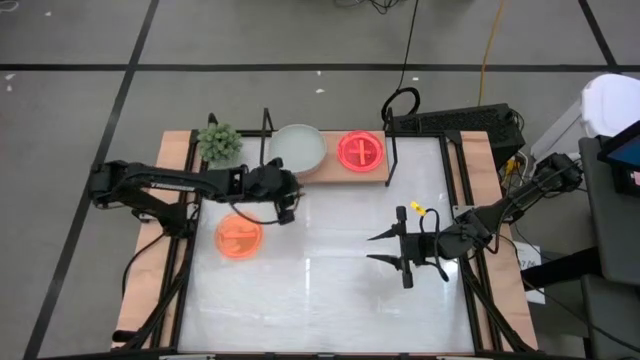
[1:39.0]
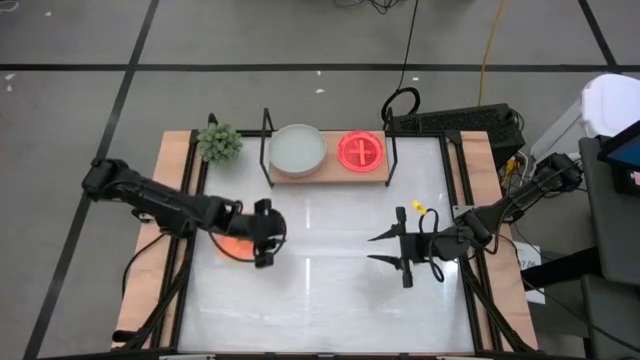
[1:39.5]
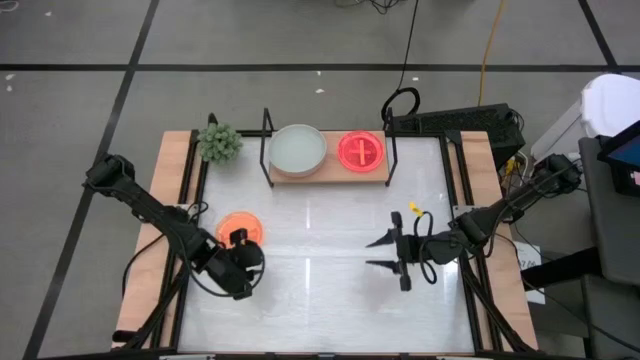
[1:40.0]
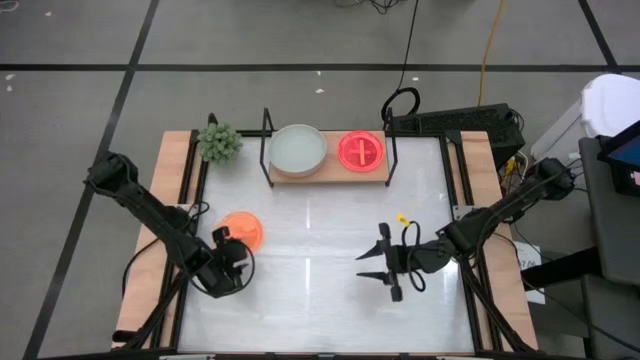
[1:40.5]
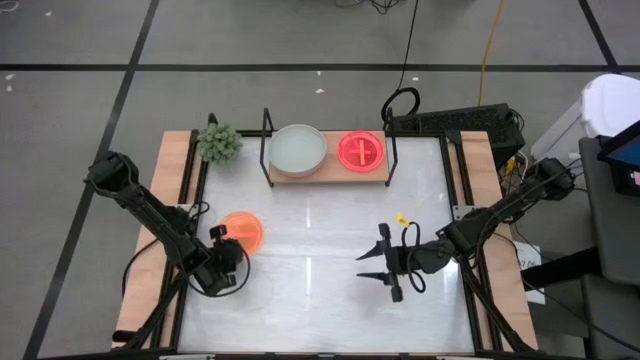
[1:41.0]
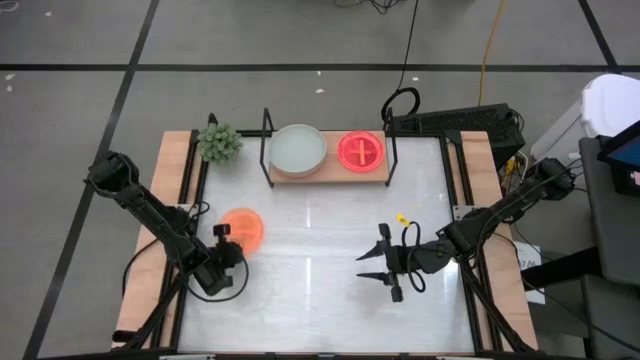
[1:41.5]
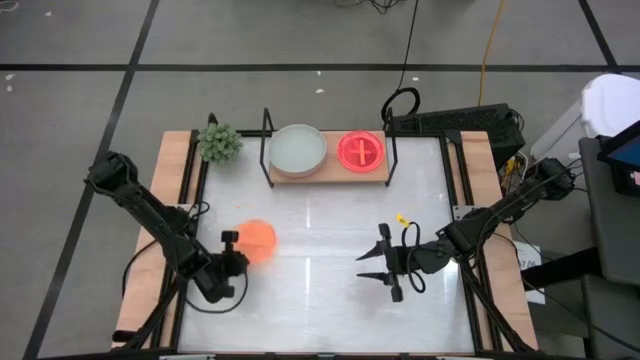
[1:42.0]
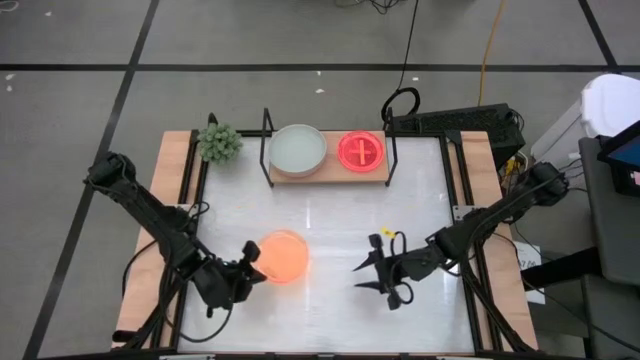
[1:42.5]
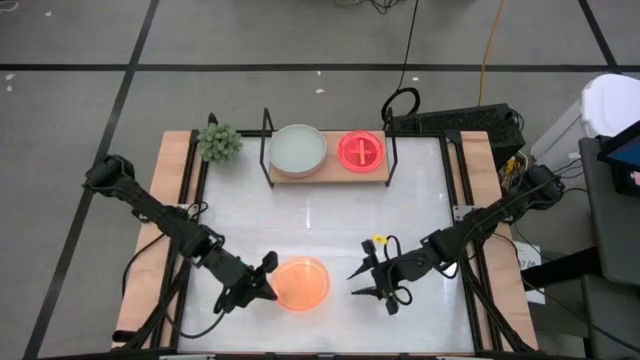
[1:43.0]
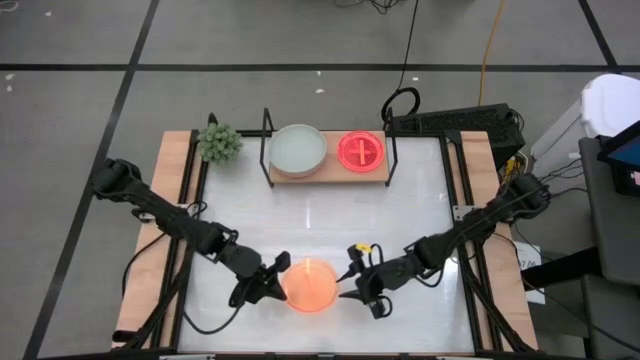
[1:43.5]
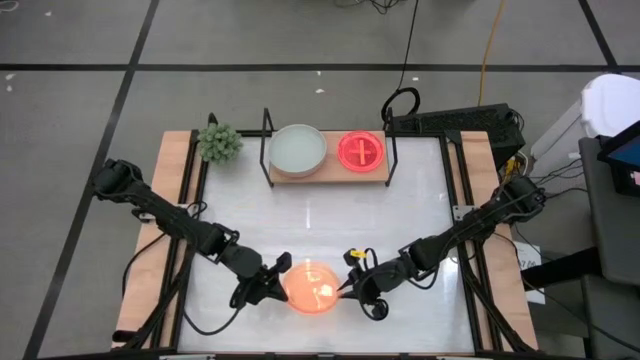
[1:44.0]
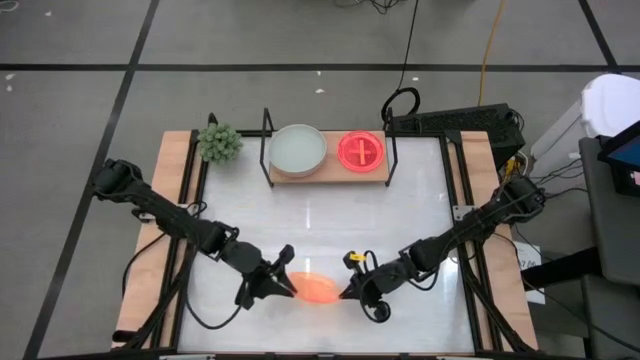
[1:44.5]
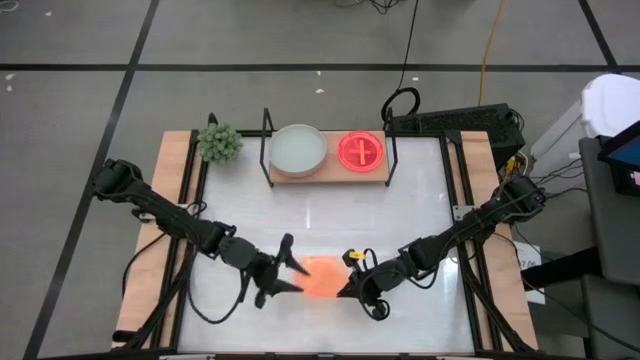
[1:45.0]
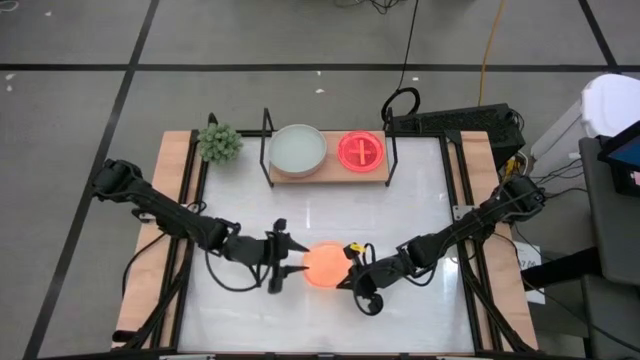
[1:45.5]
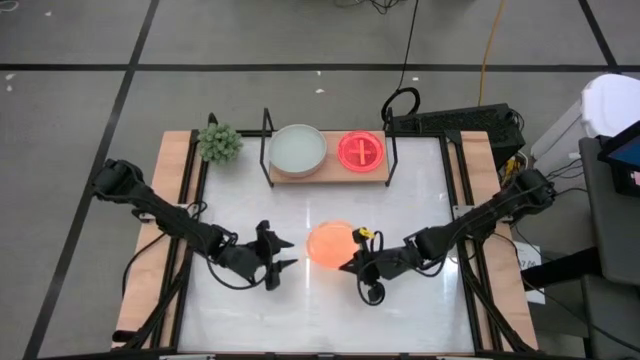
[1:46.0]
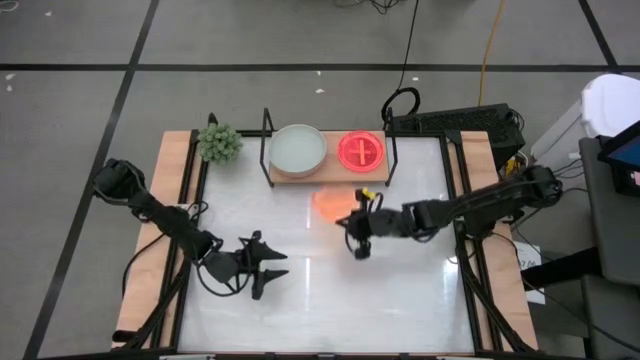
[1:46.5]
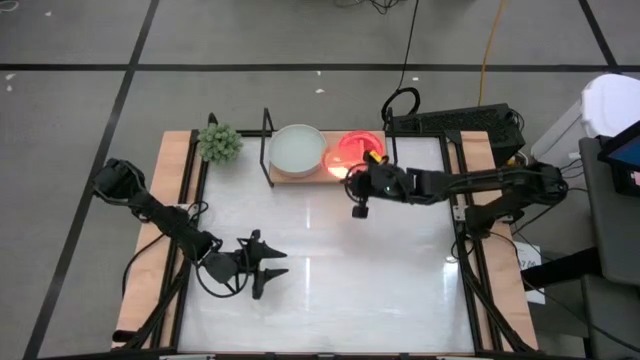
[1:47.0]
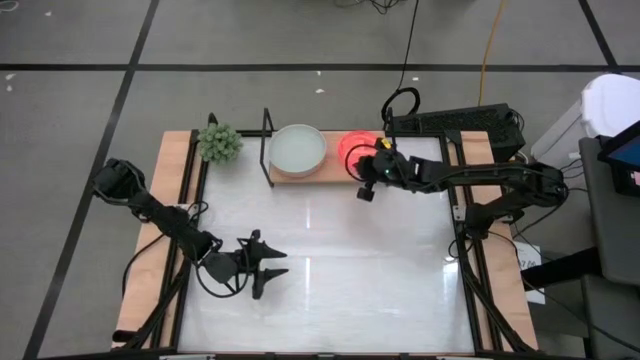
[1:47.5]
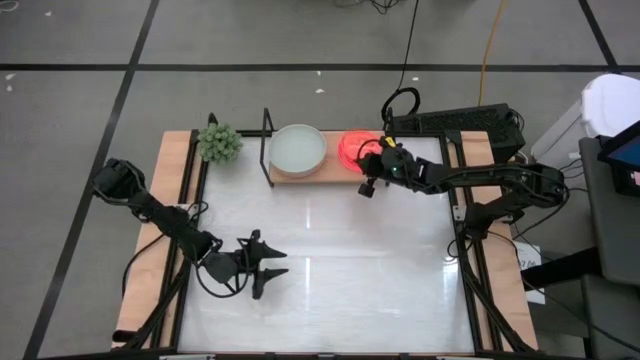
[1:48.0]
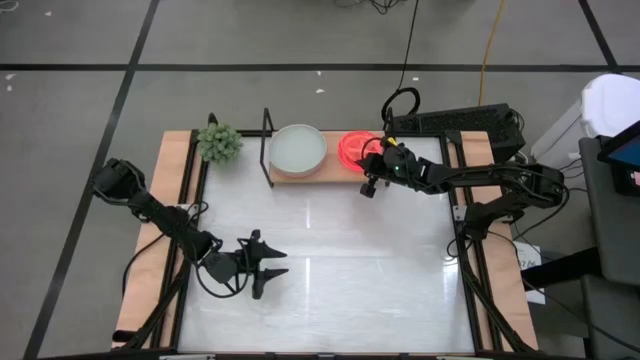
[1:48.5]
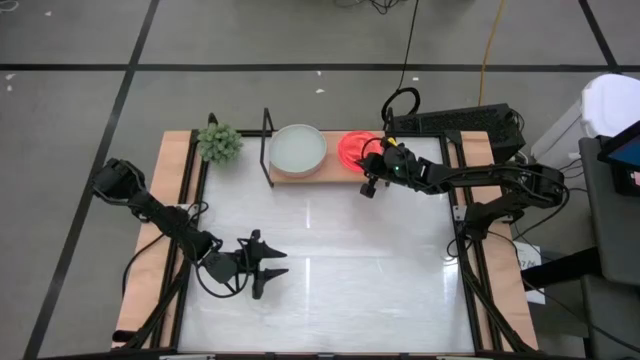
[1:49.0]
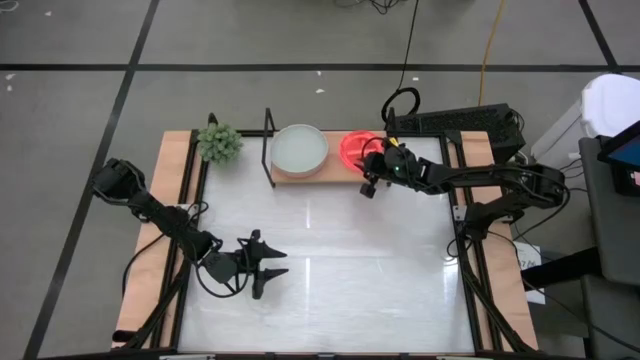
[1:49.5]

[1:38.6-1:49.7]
Task: Place and stack plates onto a shelf
Stack the orange plate on the orange plate on the shelf

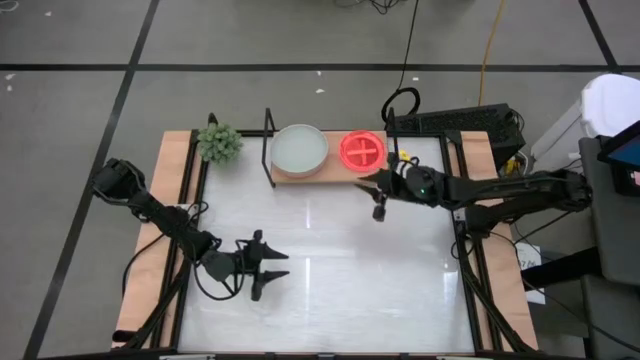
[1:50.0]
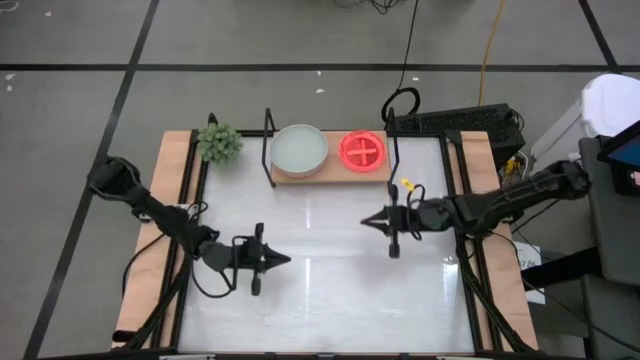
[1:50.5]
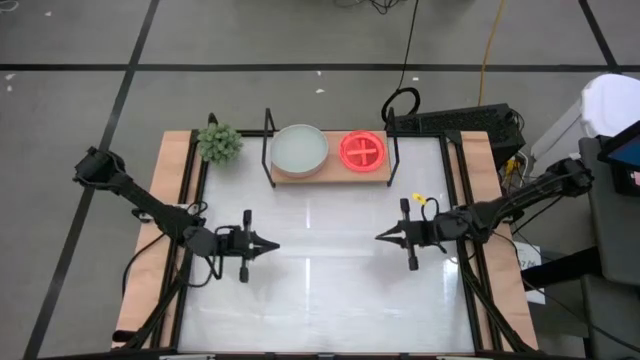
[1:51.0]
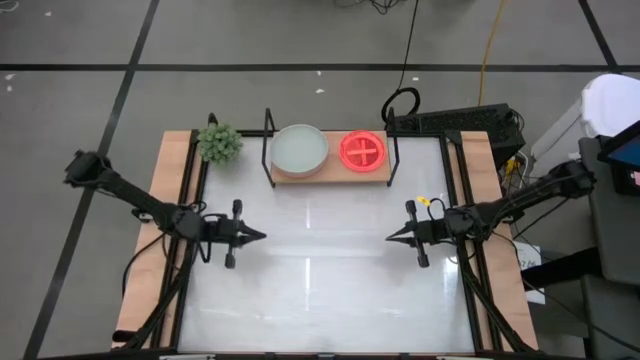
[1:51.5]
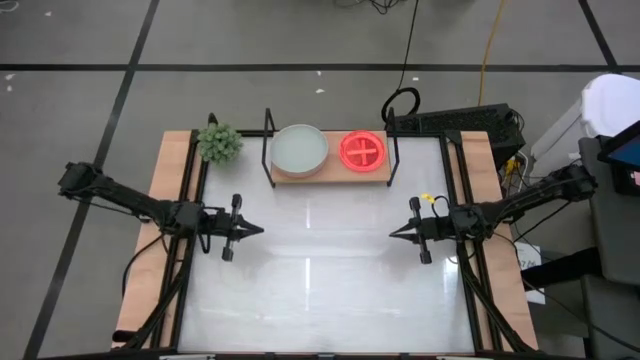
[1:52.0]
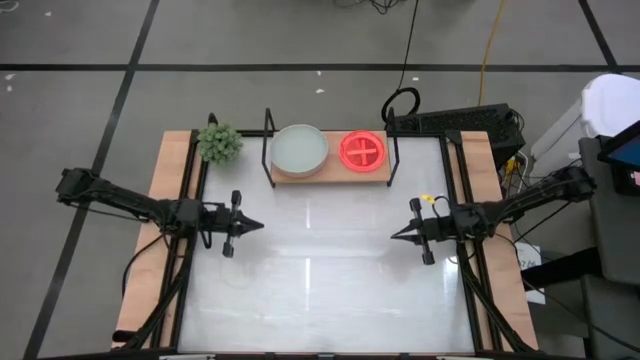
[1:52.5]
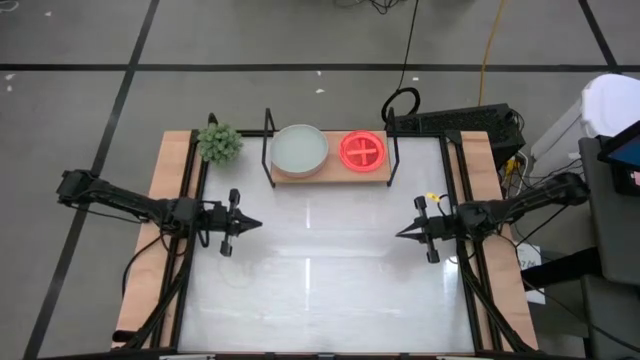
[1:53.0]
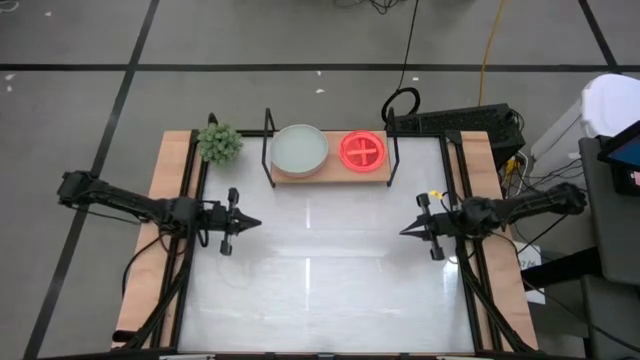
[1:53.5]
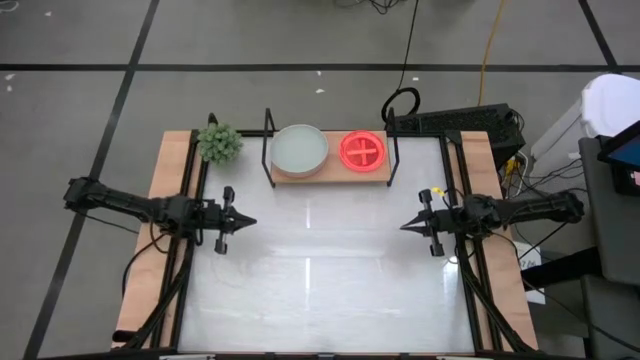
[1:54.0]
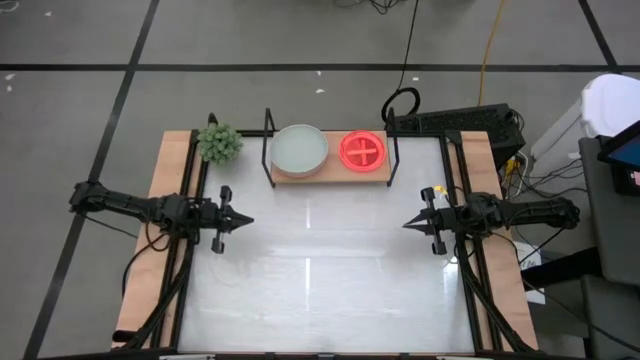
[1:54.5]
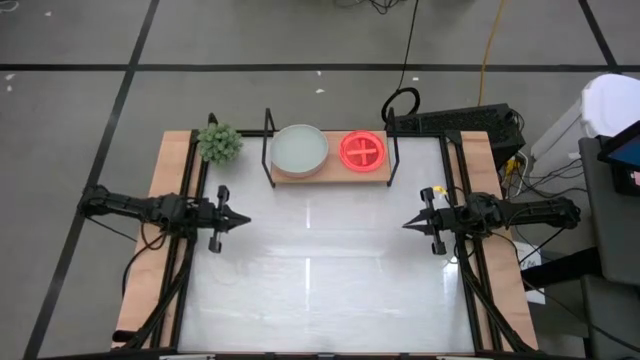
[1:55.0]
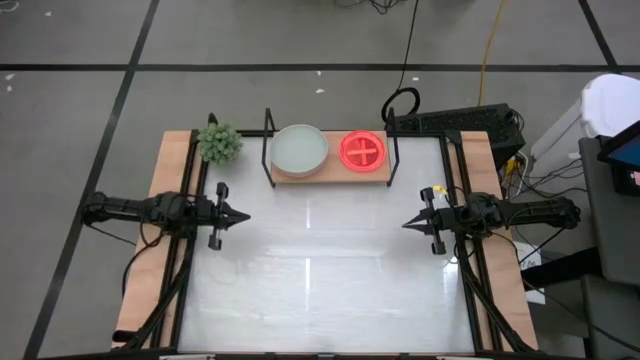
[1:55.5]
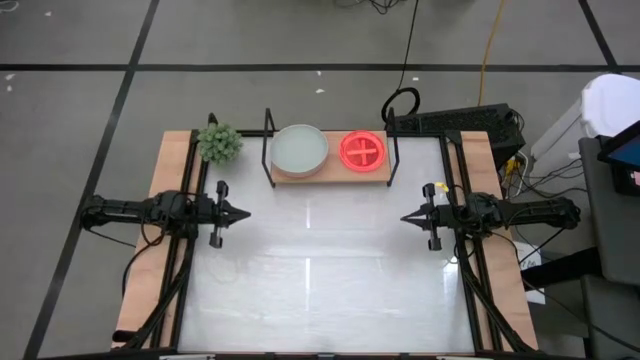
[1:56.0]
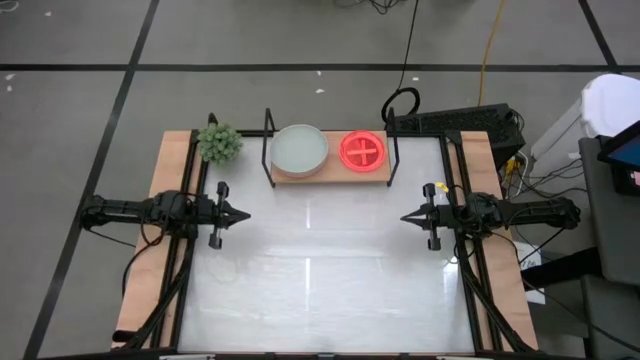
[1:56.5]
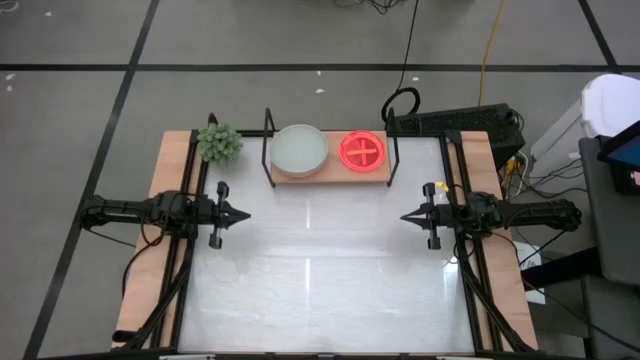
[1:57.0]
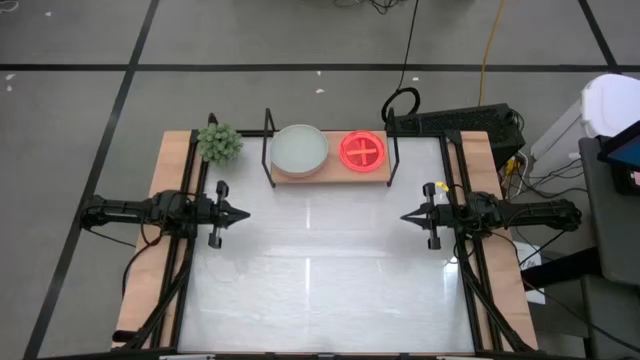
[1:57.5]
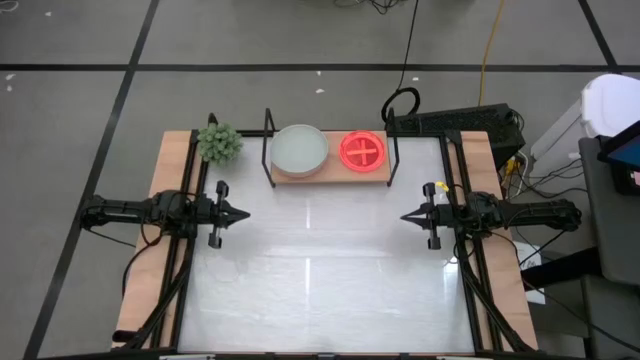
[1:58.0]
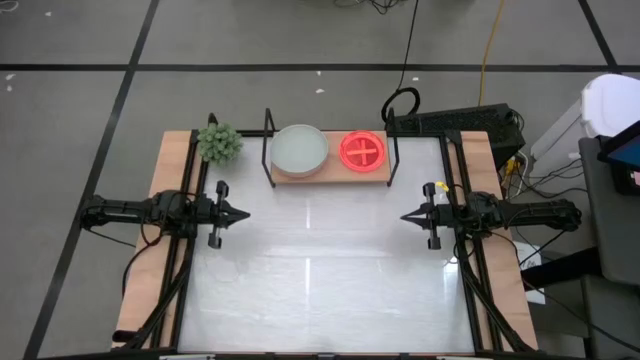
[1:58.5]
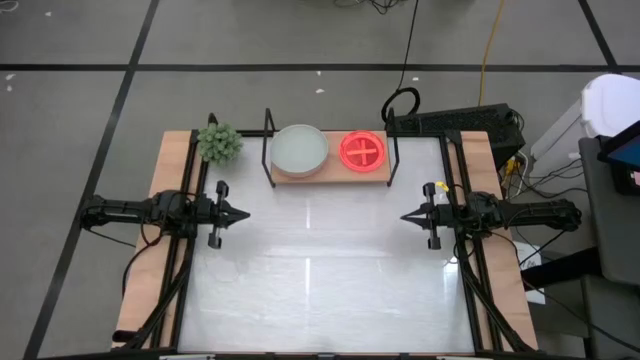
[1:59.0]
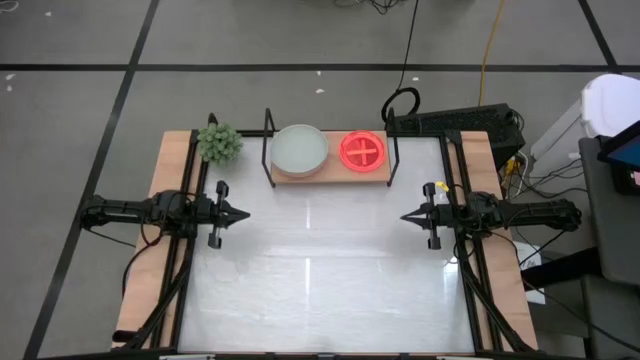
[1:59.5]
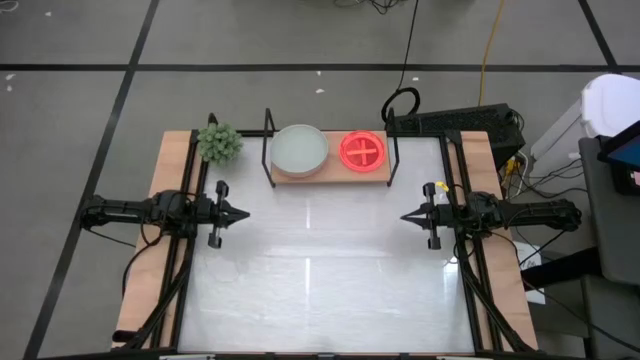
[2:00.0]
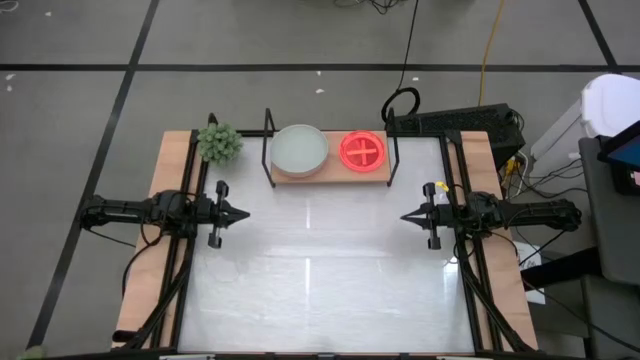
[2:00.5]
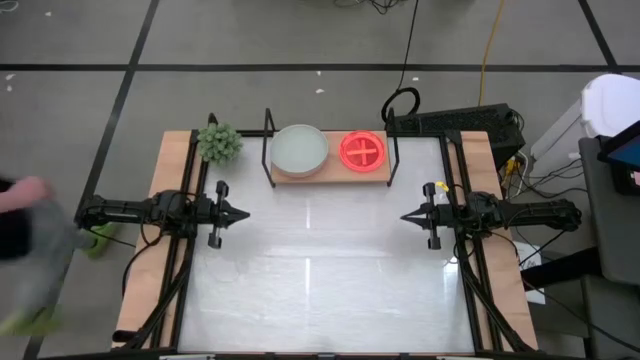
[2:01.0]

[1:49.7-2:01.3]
Return to Home Position
